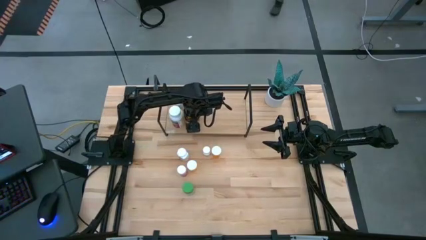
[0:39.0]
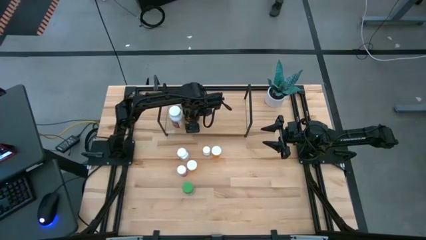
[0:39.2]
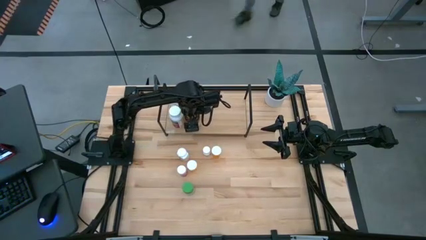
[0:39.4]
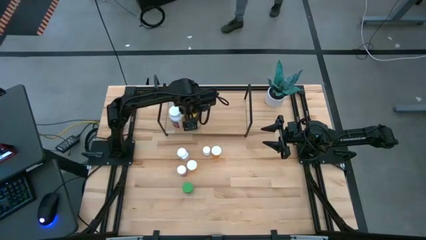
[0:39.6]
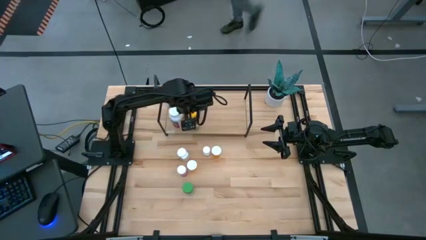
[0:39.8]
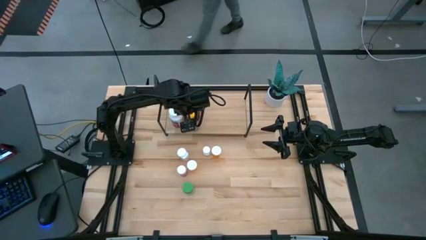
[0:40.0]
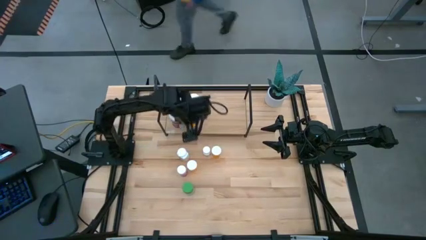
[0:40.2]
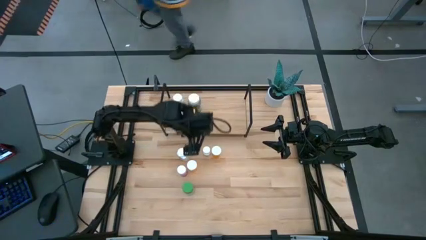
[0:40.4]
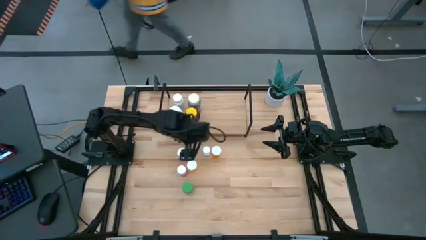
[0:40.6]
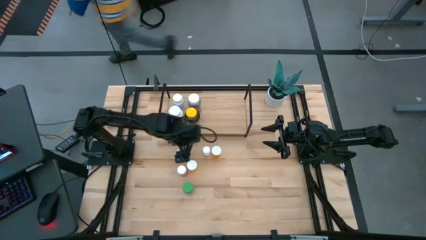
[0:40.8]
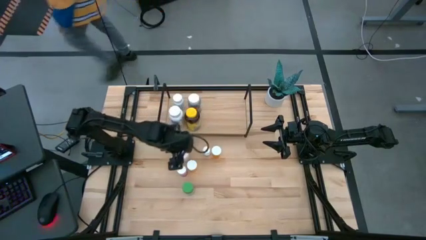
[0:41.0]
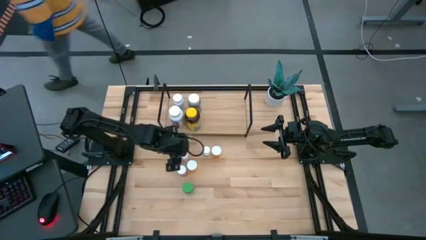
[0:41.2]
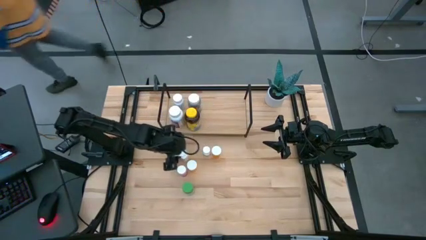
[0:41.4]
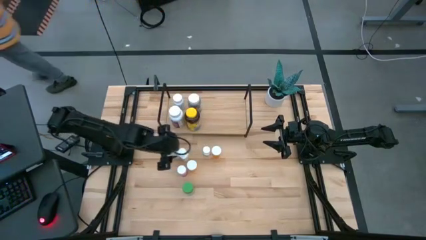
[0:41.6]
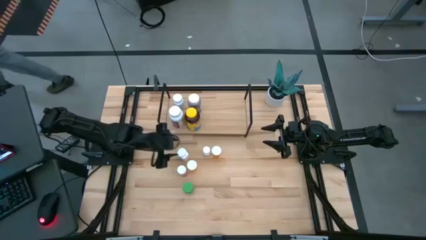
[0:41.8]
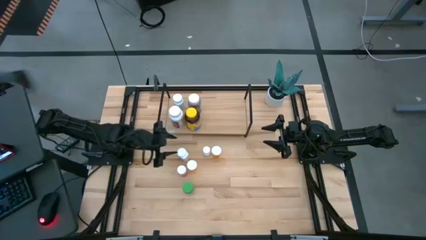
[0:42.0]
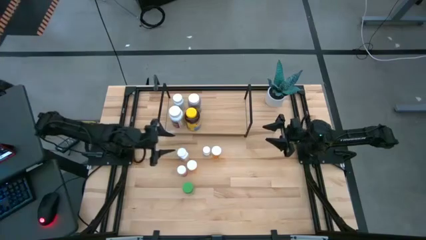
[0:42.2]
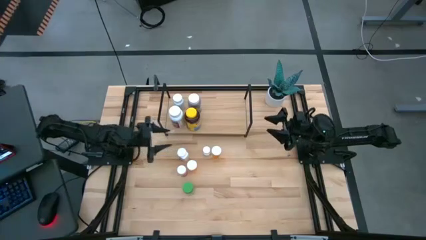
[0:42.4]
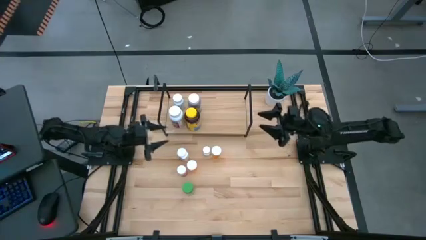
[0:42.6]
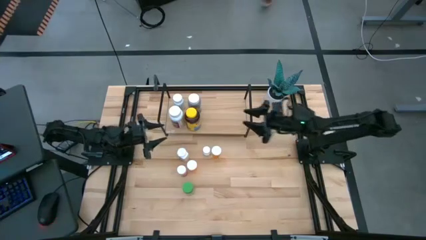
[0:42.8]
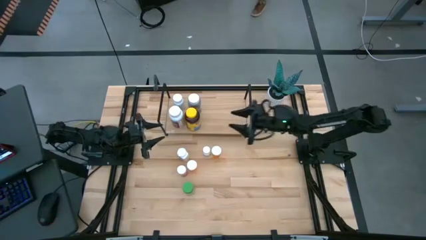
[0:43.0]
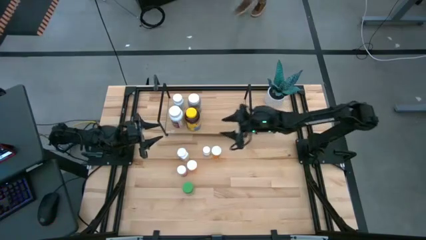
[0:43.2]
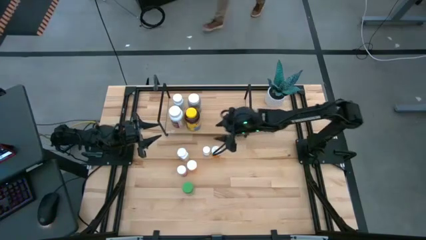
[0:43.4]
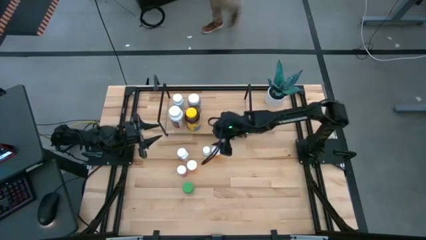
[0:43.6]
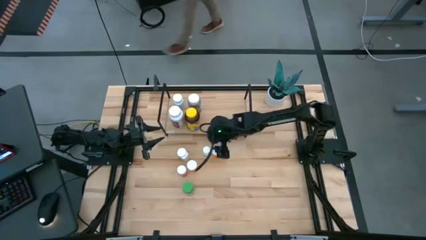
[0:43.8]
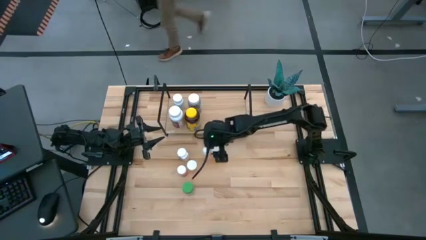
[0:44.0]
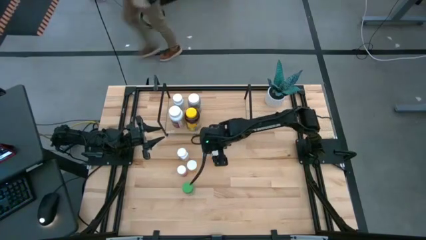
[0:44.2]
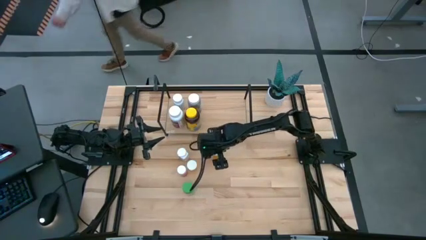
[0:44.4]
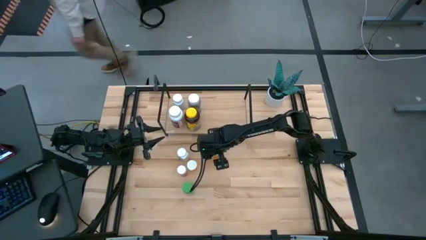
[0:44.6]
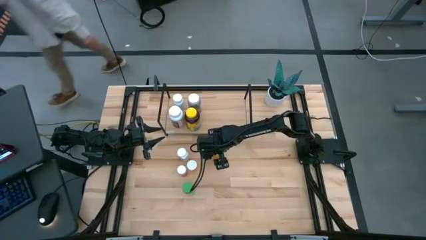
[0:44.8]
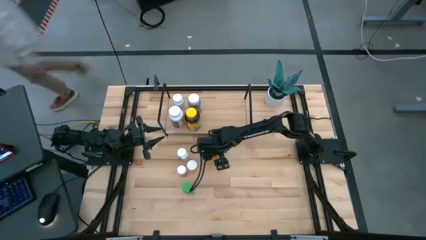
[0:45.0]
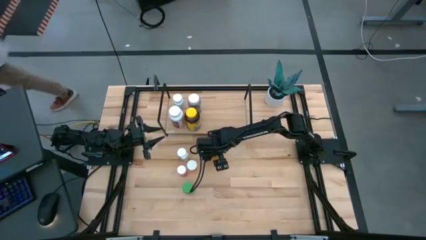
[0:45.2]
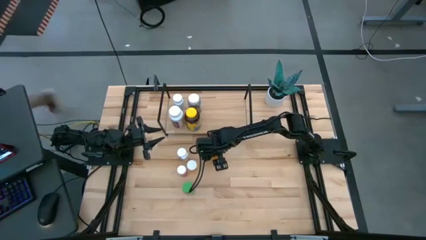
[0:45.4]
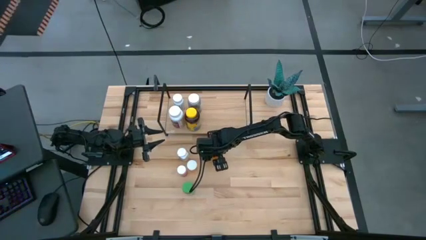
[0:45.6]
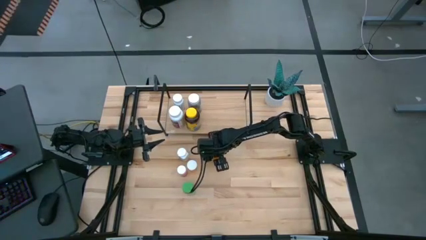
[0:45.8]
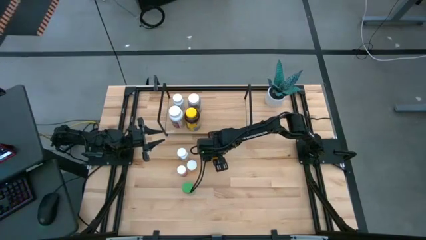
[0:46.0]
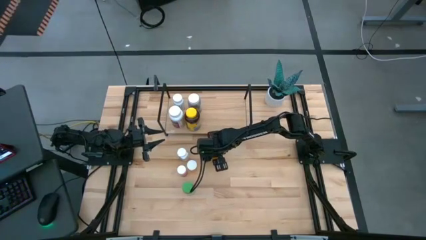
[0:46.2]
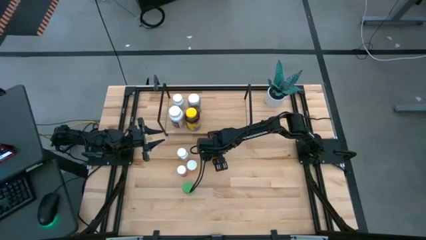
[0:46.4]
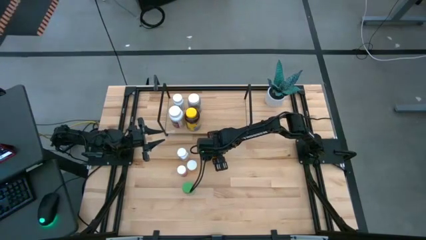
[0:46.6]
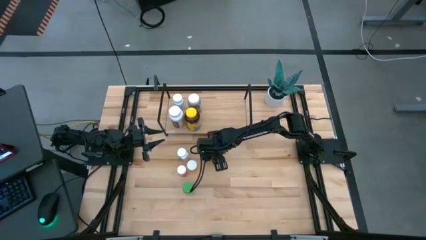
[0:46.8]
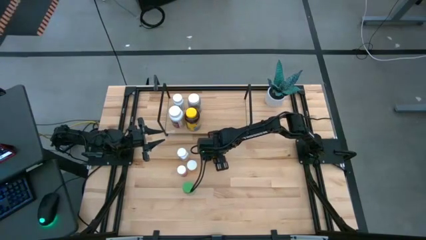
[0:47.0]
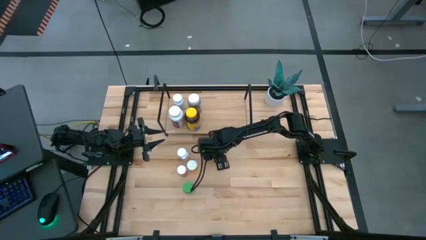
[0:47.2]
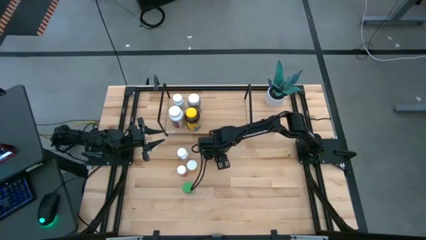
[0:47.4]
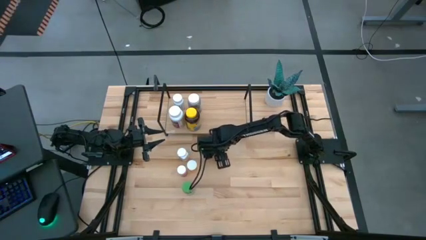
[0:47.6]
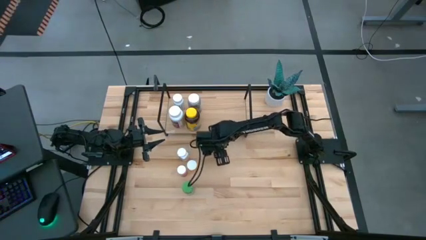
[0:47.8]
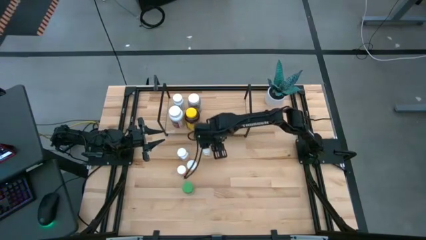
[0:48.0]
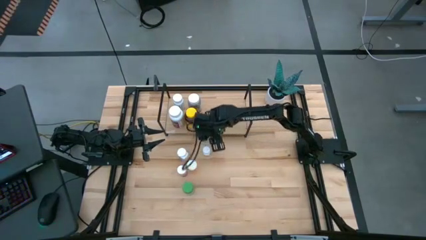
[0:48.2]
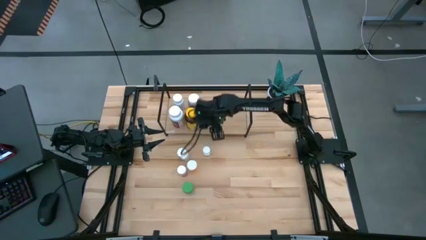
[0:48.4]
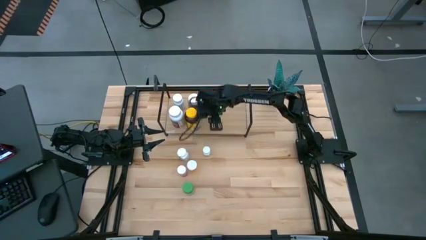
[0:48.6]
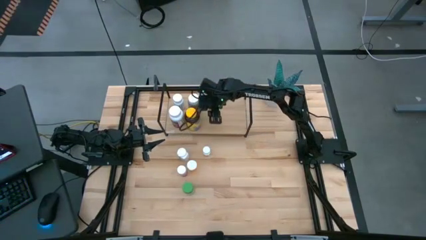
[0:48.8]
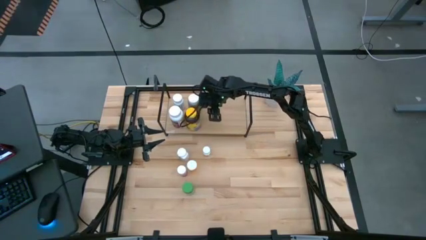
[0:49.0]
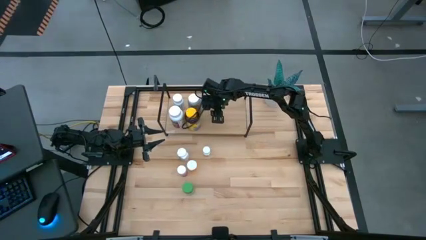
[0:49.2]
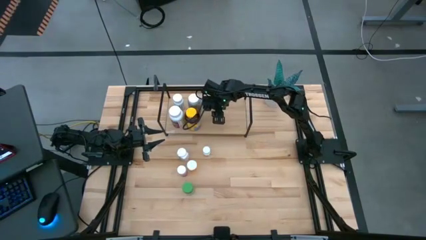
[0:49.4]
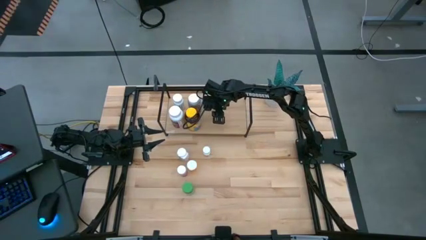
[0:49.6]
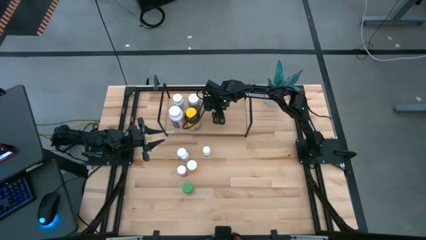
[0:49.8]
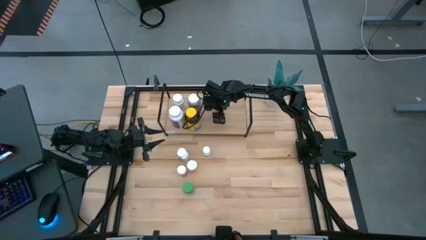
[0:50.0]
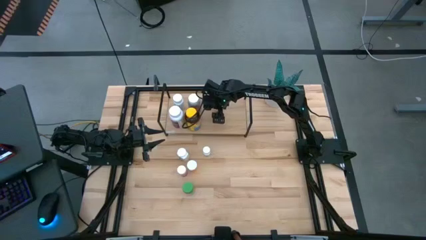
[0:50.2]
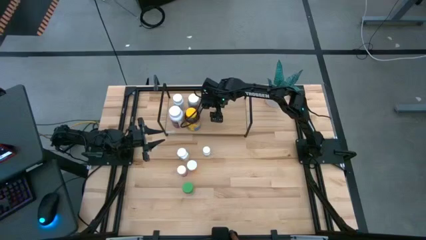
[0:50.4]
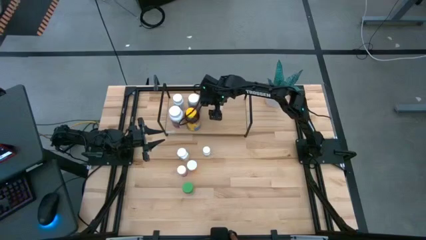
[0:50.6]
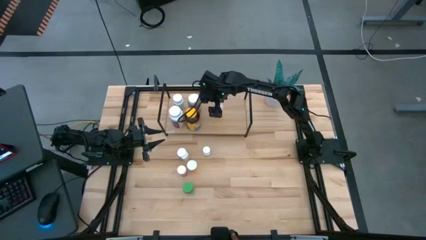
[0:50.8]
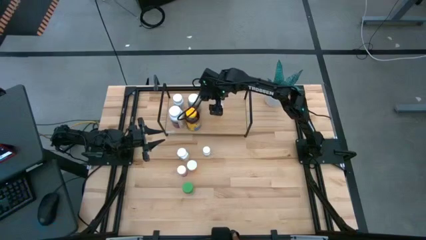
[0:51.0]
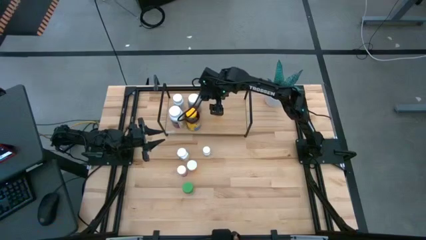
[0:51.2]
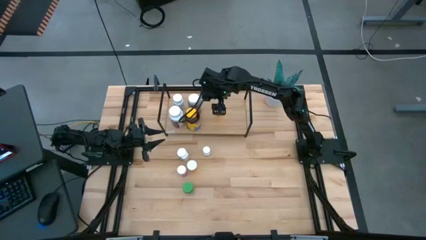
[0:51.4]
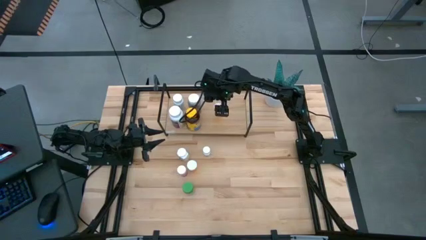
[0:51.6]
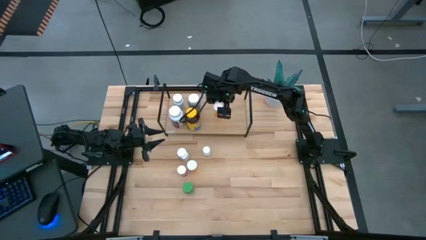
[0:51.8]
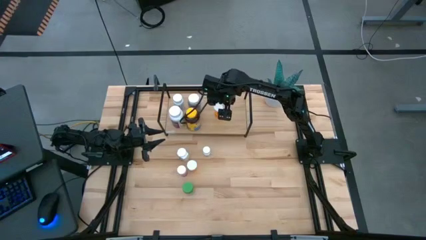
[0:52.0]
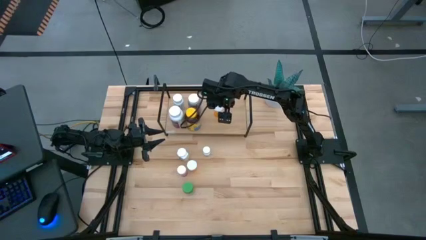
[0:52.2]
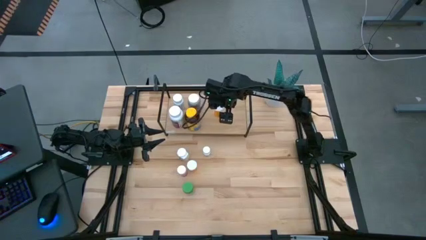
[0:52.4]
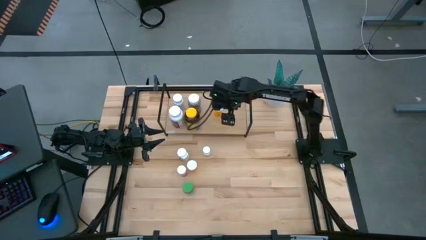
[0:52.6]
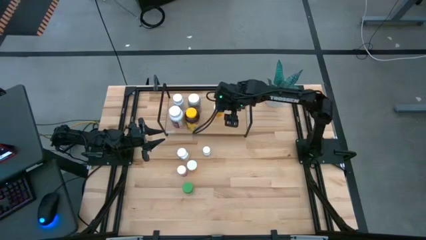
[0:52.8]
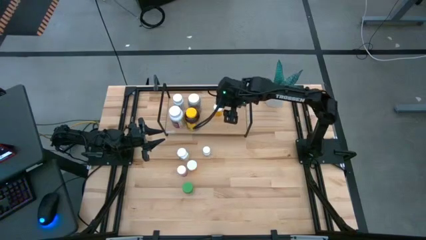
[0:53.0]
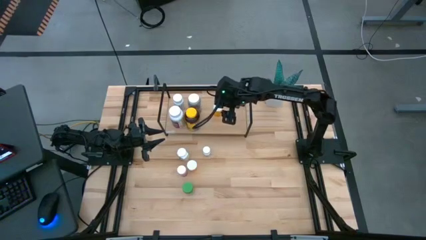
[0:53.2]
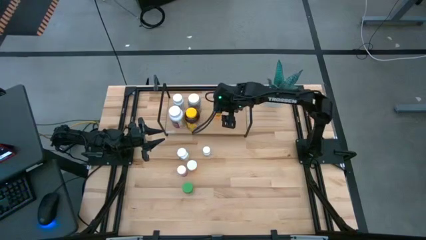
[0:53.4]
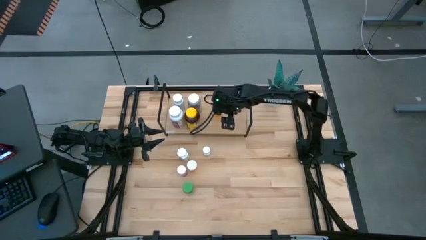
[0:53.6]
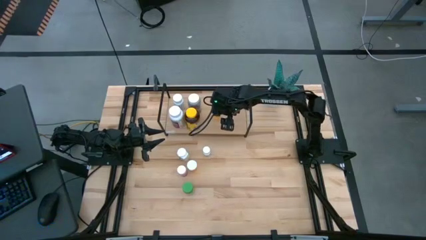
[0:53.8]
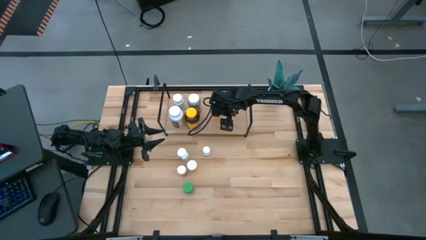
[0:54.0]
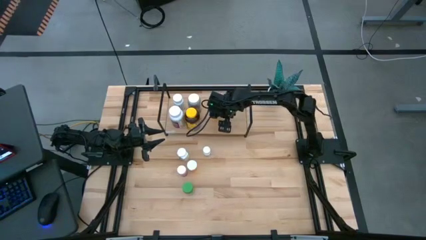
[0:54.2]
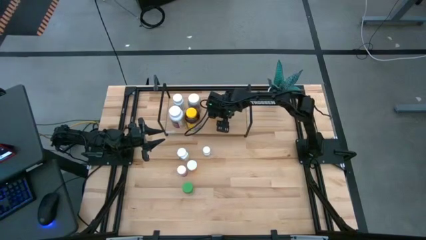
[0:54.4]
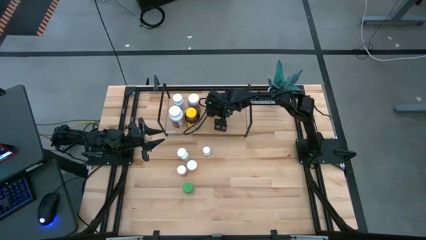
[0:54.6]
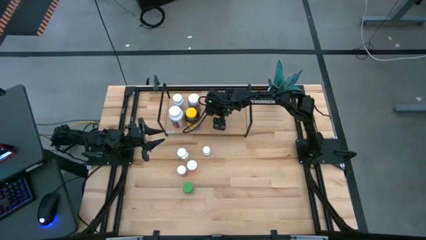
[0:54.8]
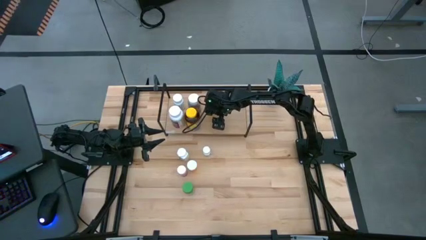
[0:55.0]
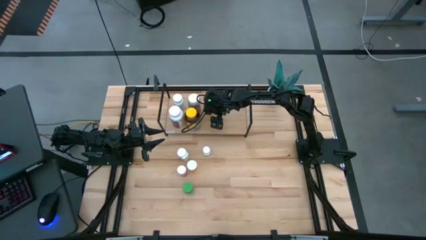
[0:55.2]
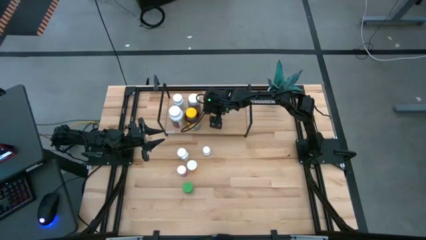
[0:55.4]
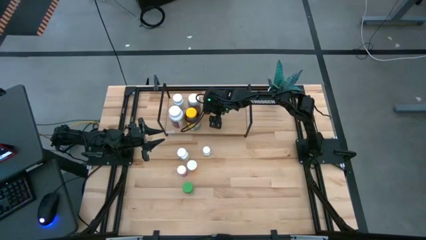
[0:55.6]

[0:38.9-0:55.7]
Task: Pick and place medicine bottles onto shelf by color
Put the right orange bottle on the shelf
